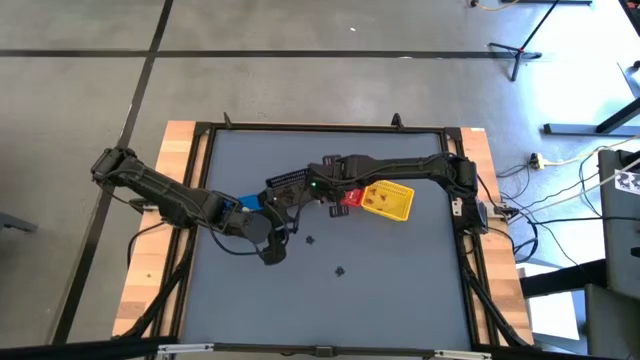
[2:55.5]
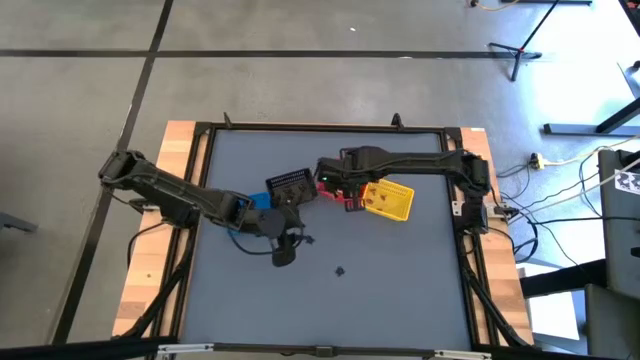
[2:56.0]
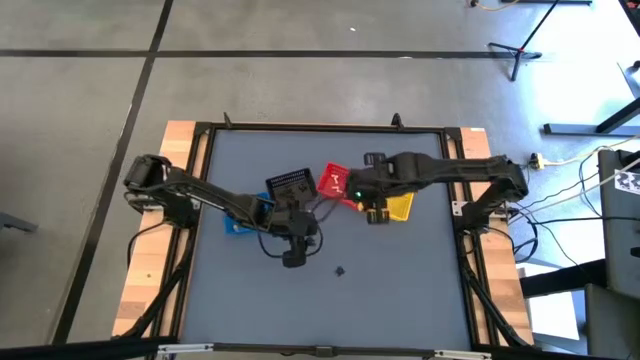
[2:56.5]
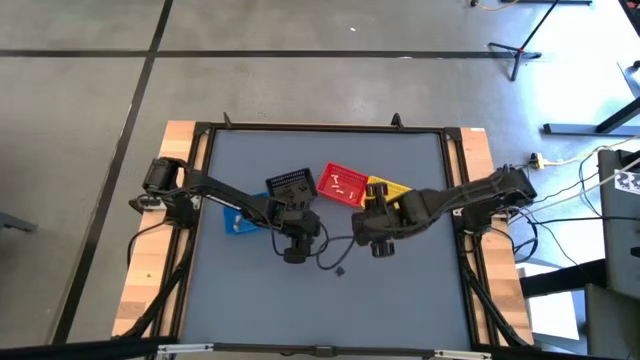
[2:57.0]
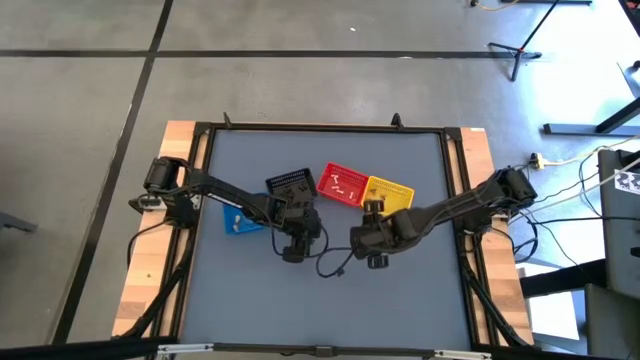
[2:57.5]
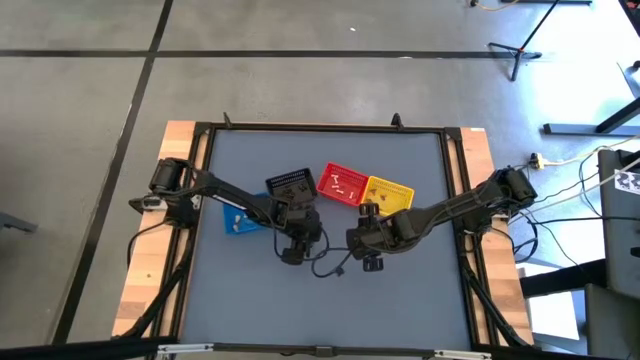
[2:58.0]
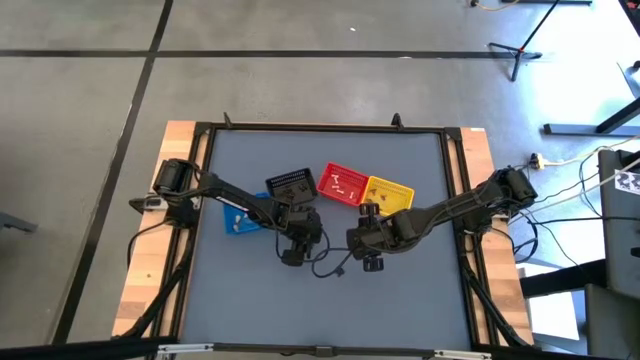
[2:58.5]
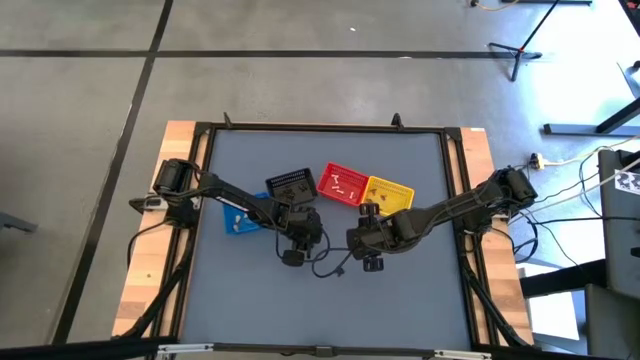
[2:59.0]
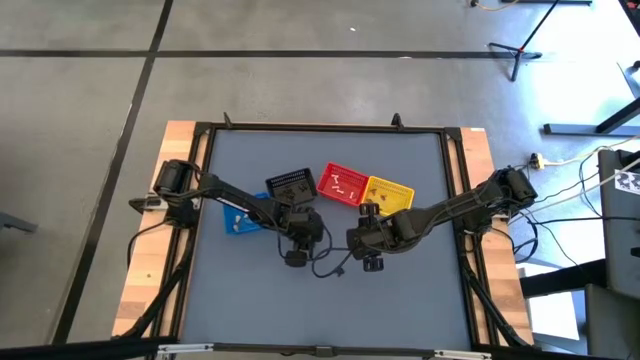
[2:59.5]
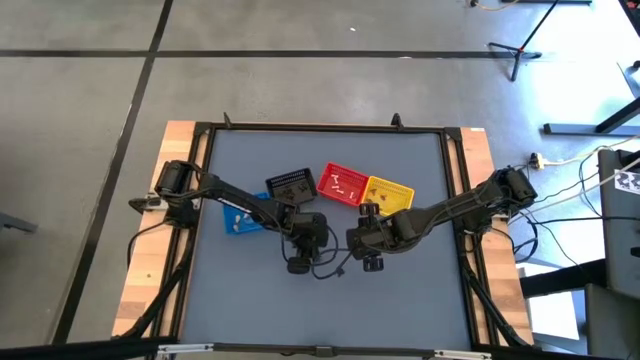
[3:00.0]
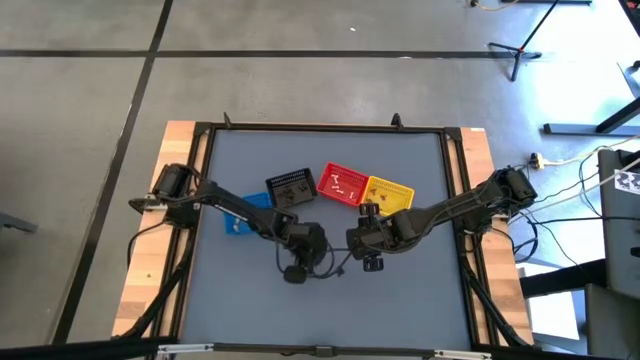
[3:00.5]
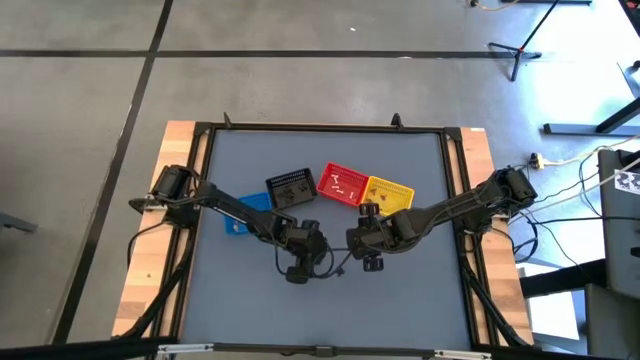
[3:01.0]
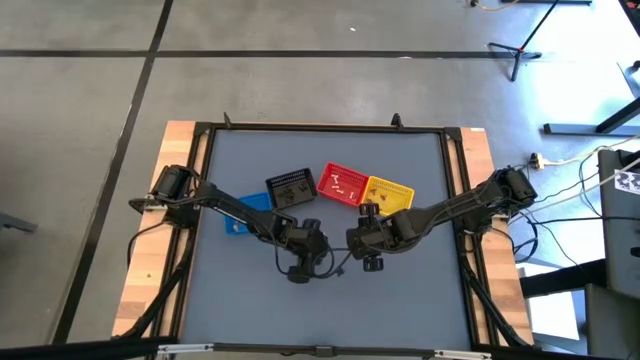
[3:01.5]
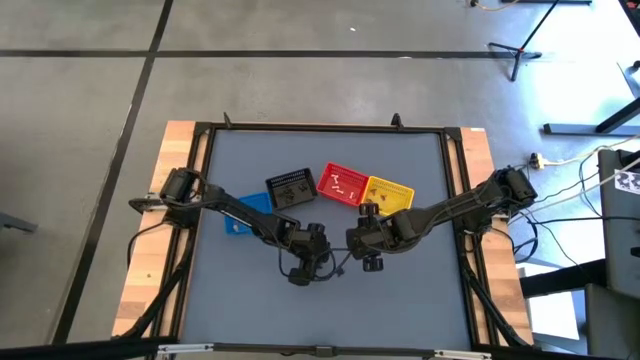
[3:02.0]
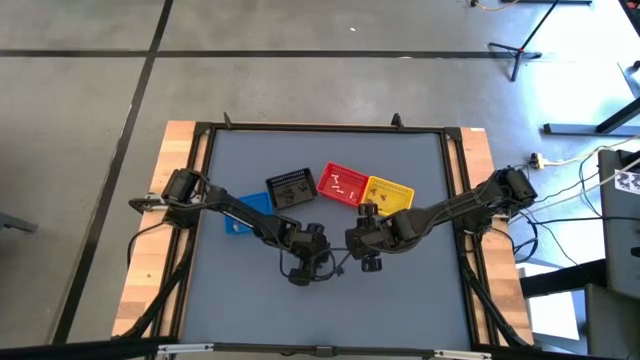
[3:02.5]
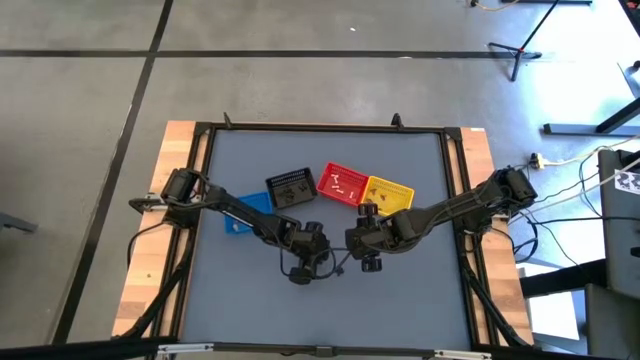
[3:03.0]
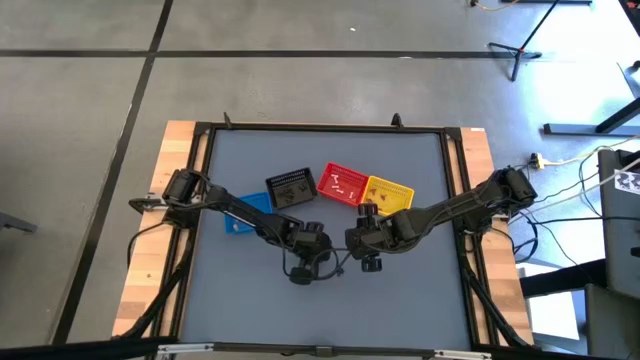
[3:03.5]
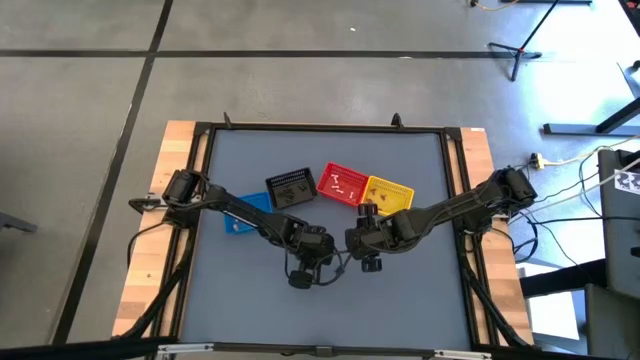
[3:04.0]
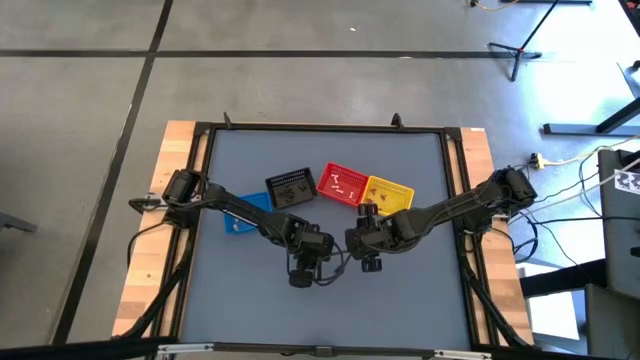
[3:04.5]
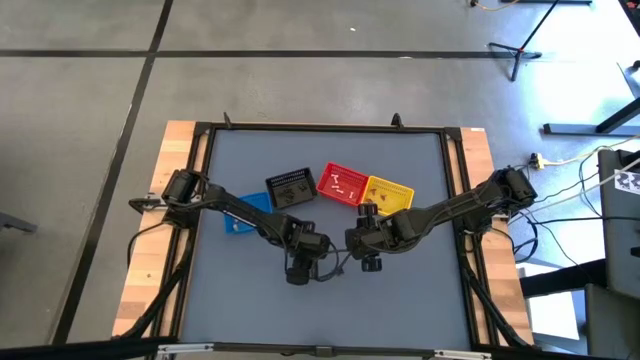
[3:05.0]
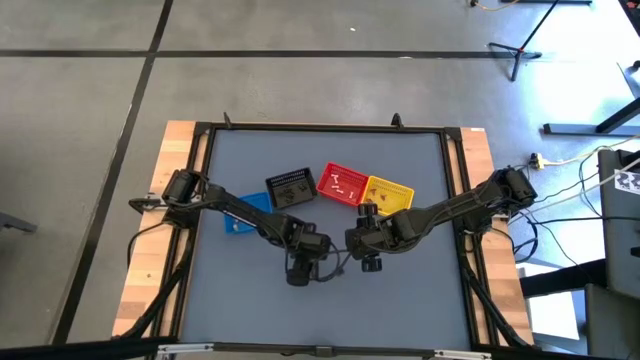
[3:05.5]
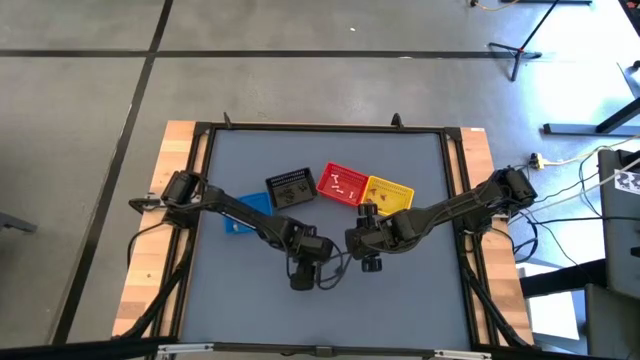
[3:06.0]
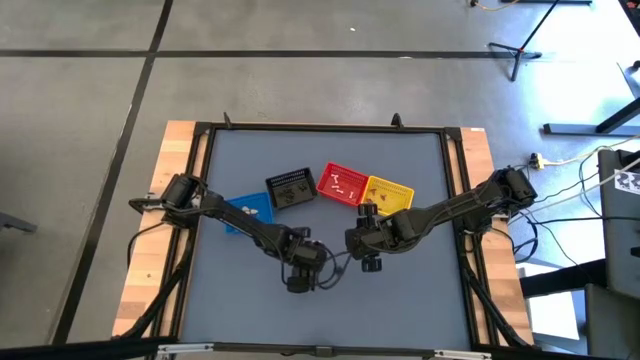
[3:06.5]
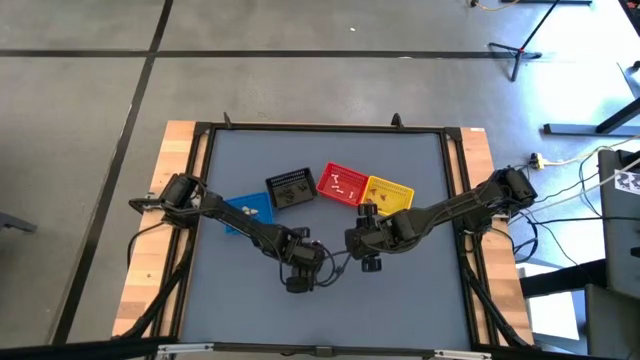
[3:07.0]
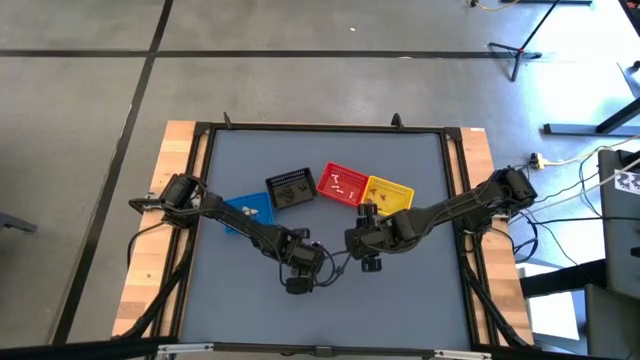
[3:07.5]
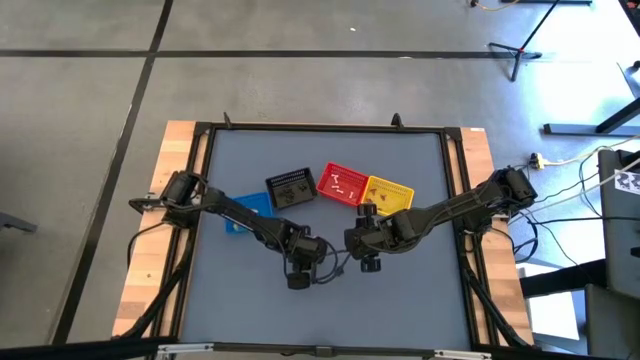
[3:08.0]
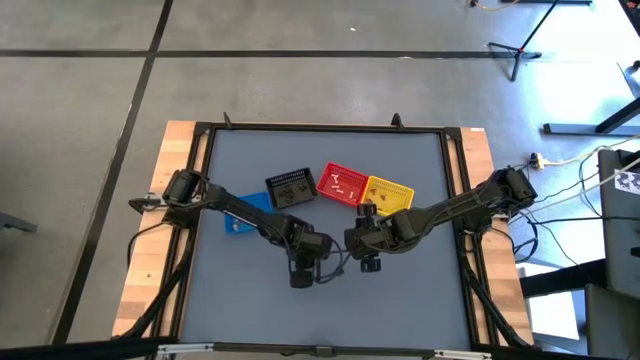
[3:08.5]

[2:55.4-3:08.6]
Task: Sort Halloween decoration
Put the black spider toy into the black bin
